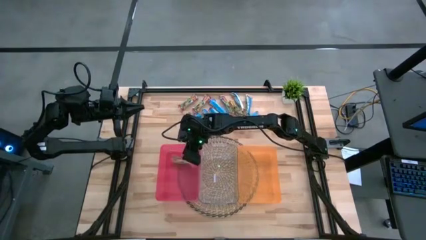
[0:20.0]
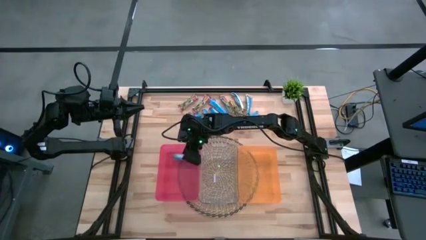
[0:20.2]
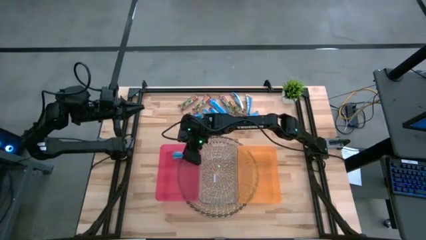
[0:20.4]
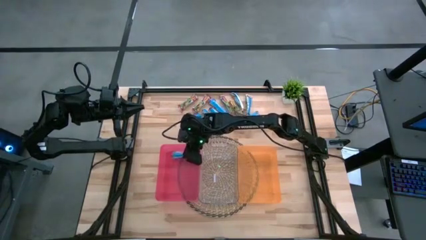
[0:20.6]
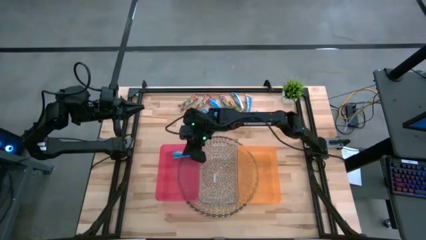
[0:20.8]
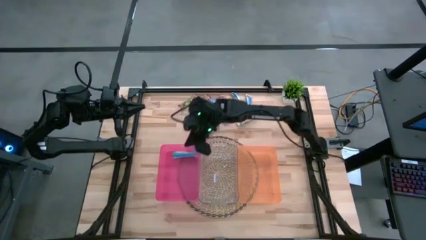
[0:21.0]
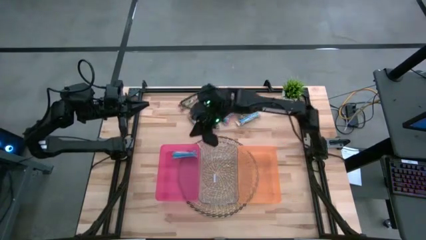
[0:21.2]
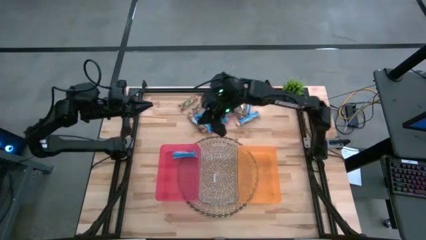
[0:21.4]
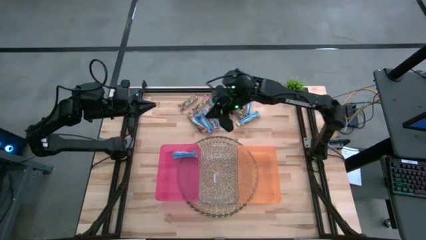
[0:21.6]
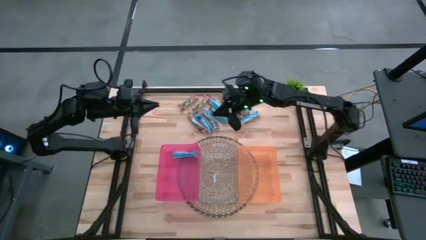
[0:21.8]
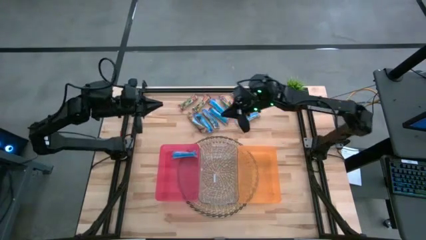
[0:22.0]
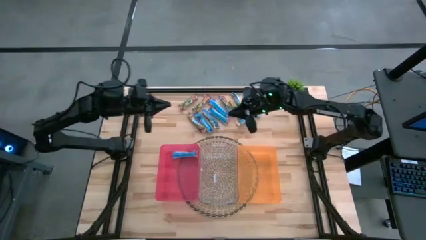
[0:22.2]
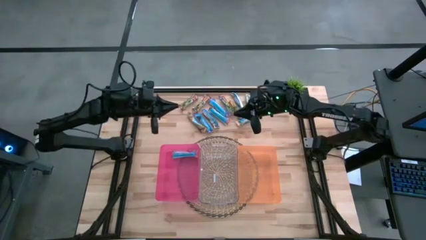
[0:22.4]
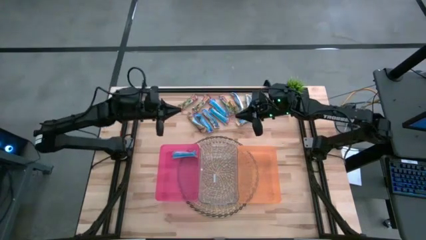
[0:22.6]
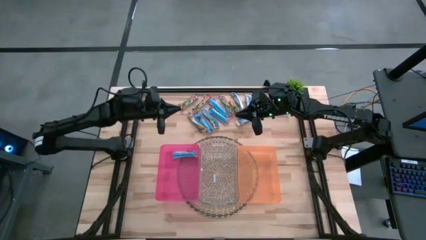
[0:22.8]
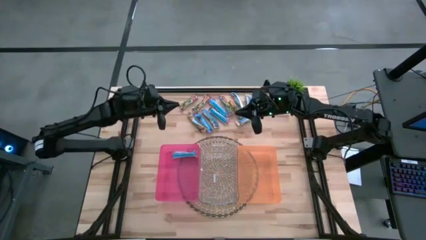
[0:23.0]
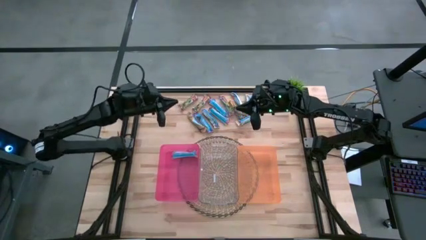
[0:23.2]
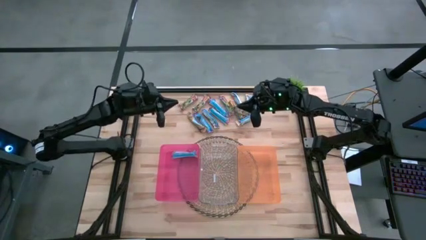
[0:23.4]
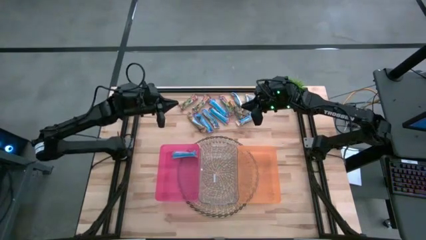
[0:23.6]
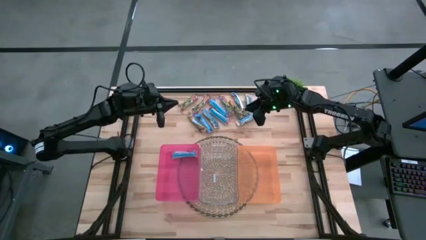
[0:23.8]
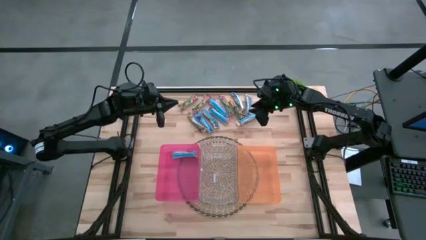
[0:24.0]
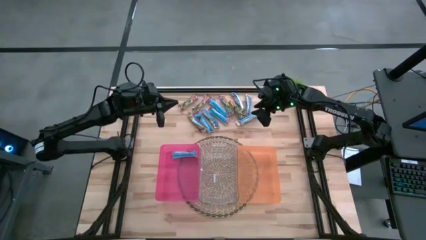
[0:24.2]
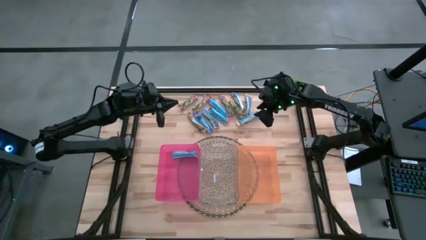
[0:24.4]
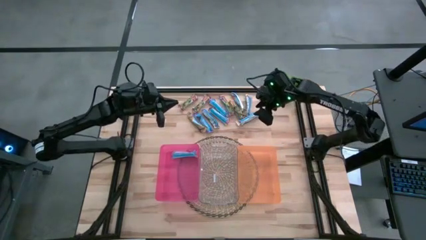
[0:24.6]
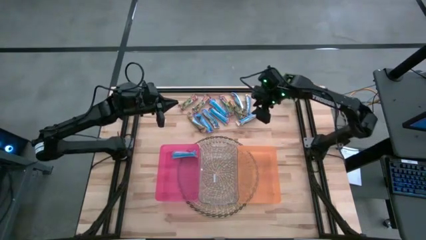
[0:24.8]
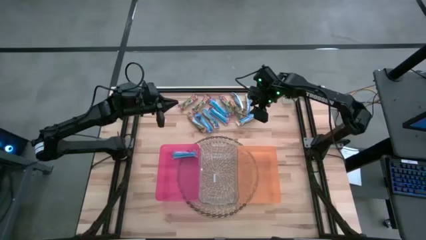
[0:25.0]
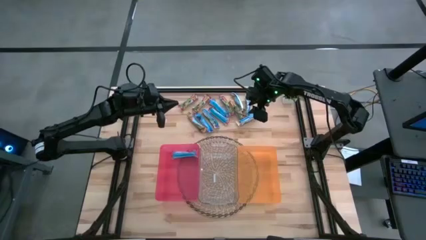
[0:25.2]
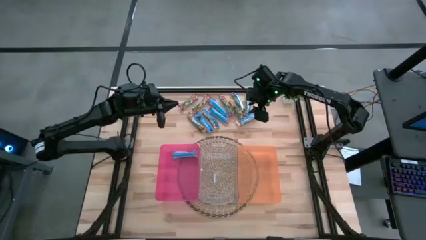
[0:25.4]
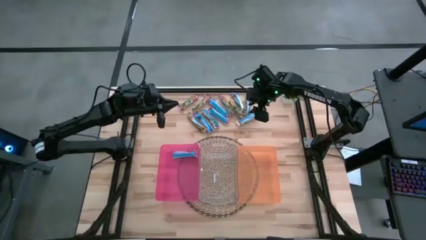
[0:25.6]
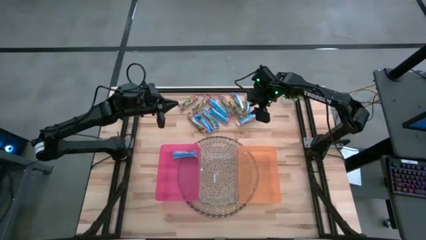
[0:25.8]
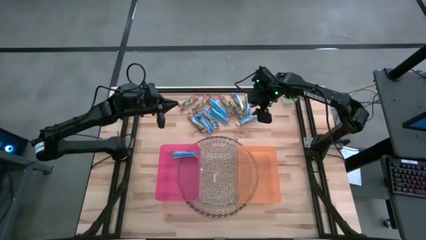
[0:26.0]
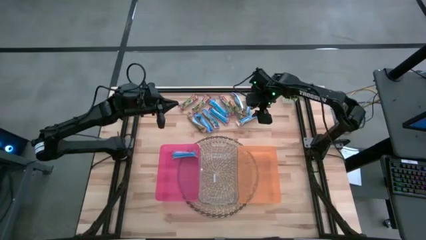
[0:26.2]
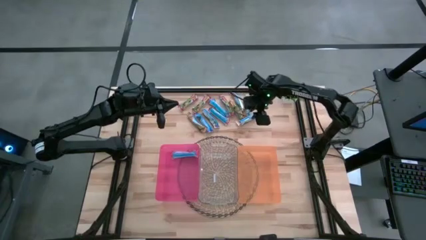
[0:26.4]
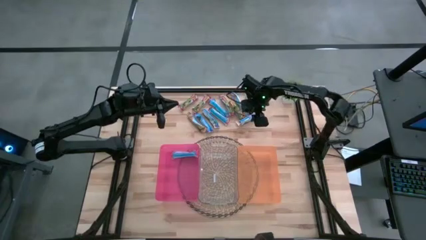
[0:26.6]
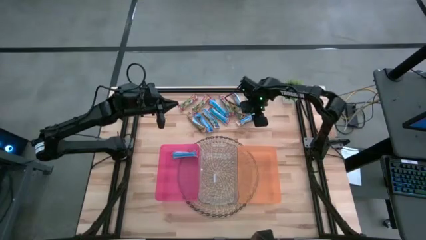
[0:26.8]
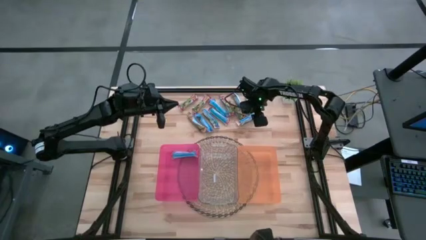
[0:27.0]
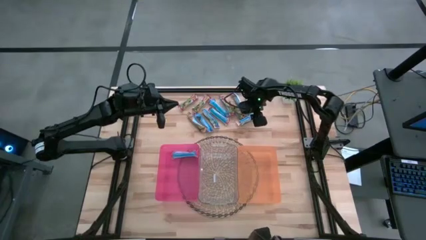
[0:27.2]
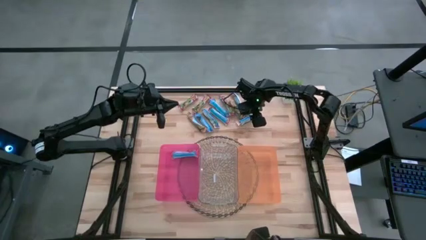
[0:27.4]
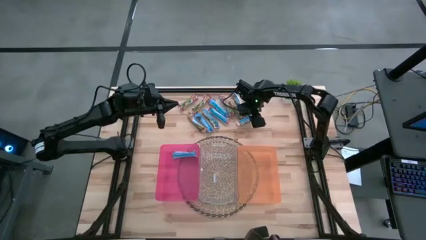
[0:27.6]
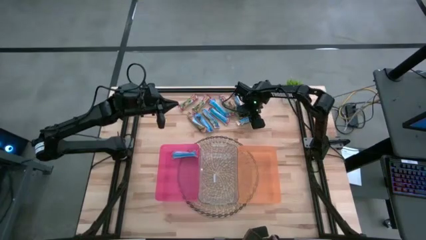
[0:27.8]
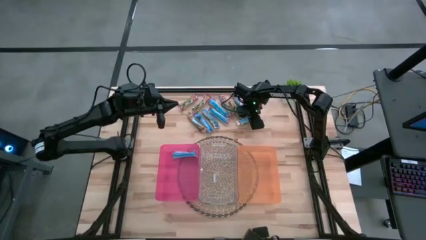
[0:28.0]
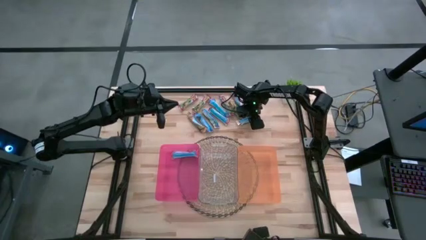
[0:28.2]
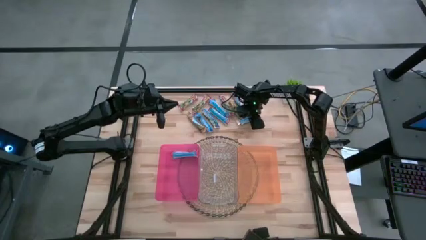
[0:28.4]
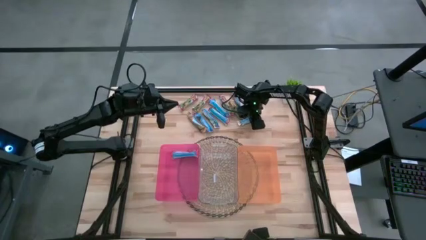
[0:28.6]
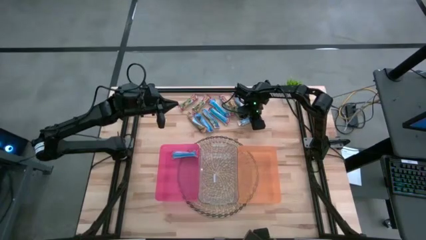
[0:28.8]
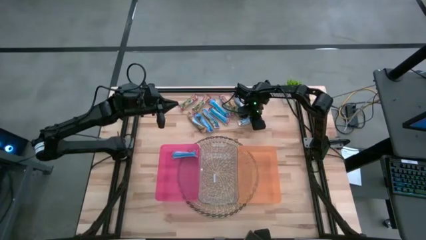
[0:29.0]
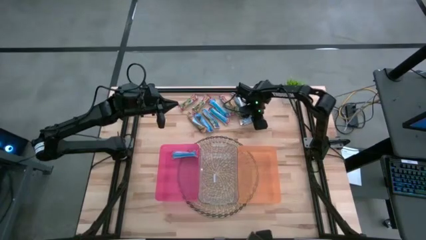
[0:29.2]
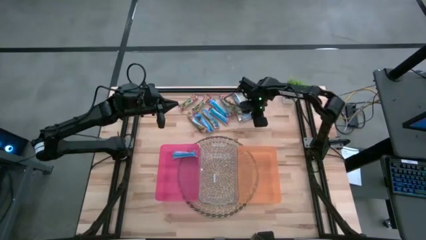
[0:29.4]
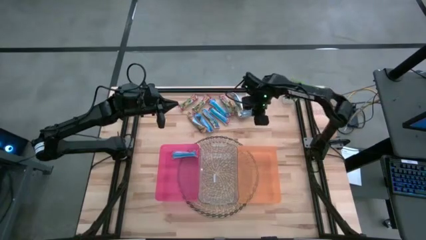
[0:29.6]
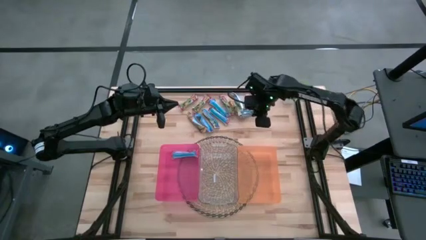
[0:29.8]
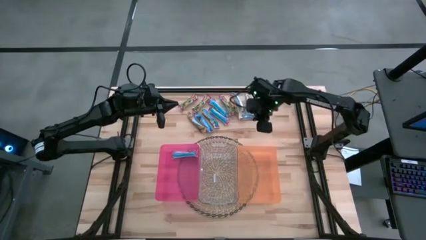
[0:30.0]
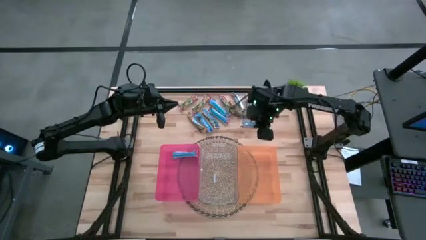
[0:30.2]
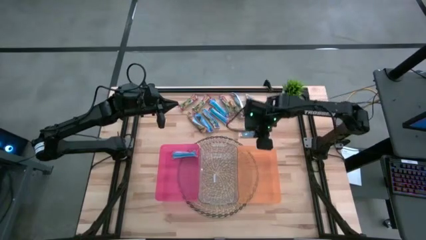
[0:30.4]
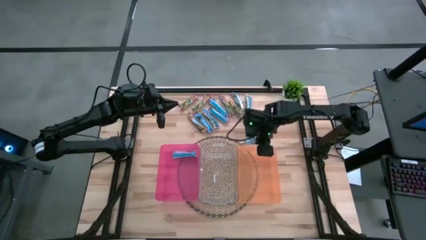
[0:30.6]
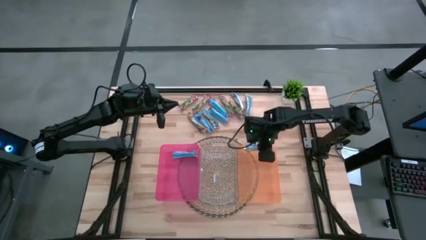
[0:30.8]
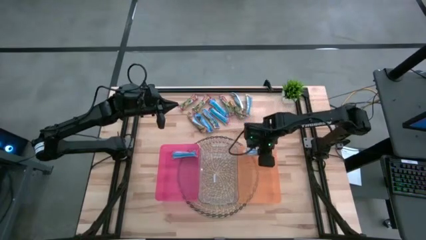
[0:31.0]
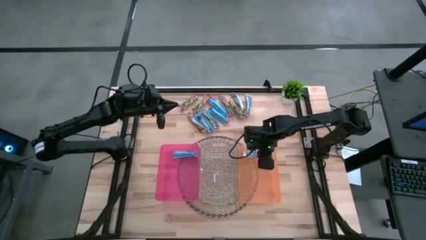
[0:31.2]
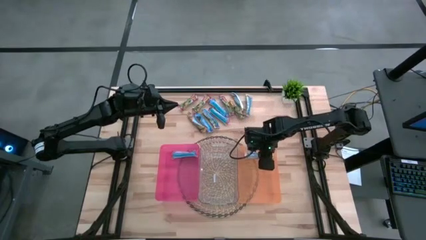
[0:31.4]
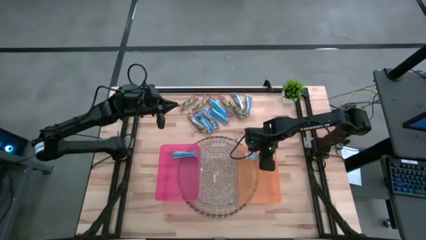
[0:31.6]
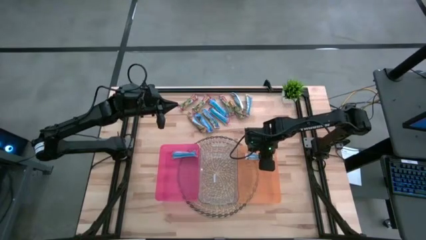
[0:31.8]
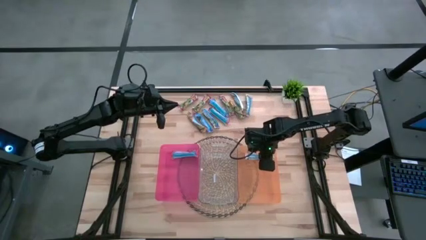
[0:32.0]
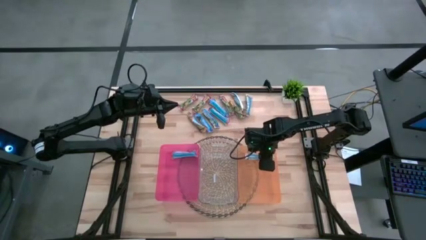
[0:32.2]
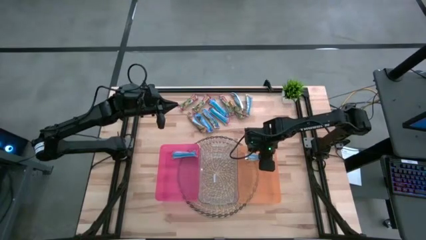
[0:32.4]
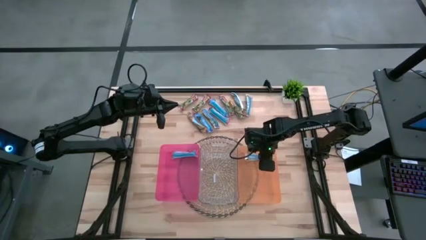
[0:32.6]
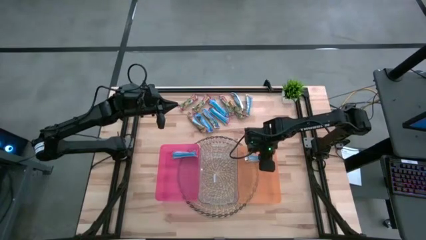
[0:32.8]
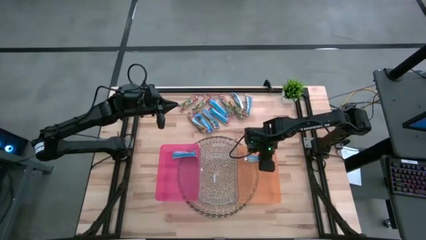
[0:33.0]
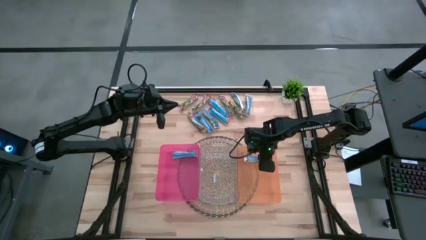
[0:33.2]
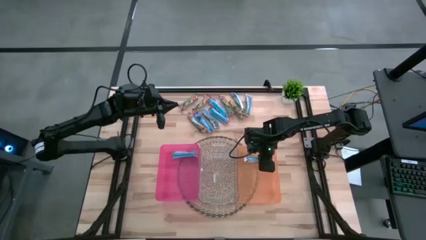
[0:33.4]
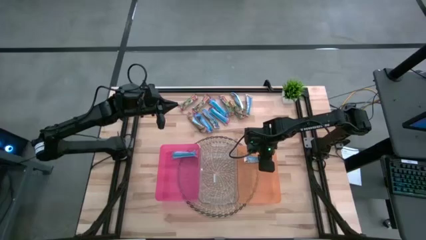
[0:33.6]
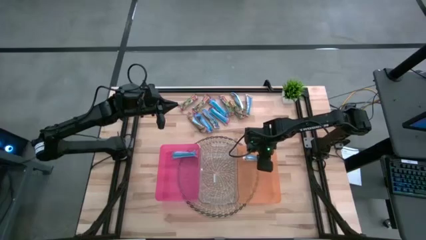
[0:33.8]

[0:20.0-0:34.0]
Task: Pick and place Granola Bars by type
Put the yellow granola bar into the orange bin
